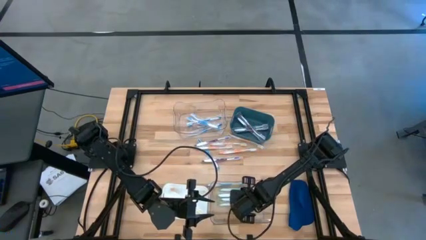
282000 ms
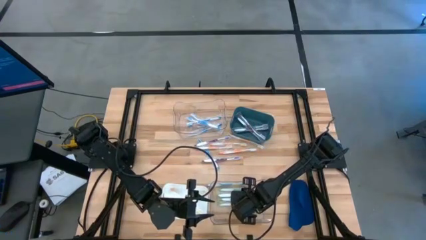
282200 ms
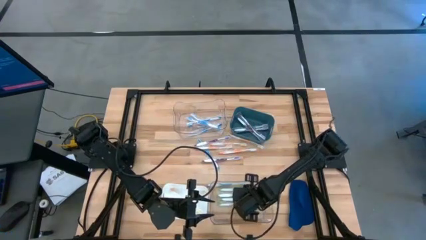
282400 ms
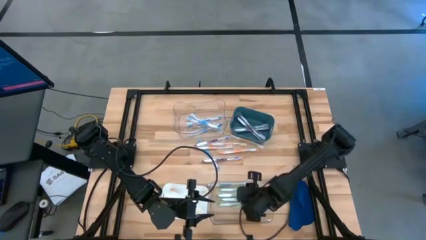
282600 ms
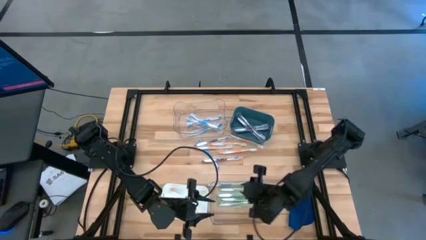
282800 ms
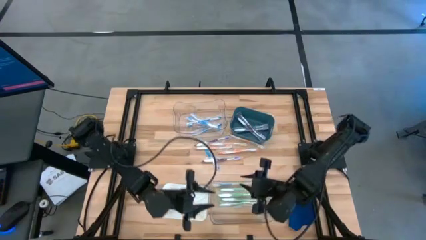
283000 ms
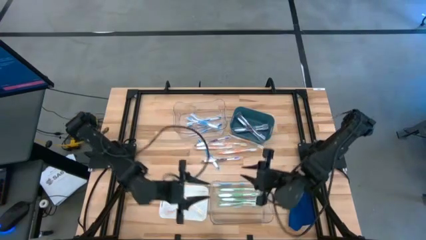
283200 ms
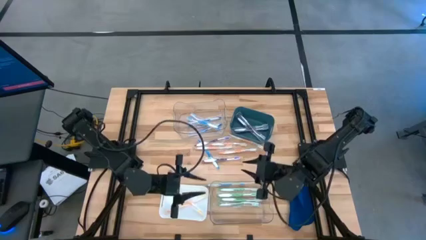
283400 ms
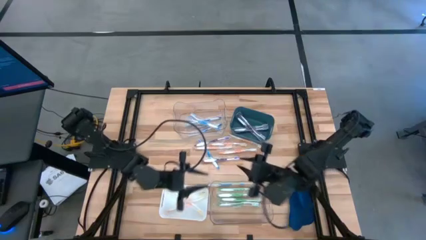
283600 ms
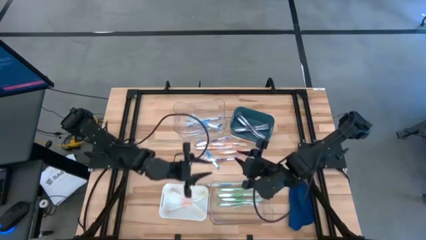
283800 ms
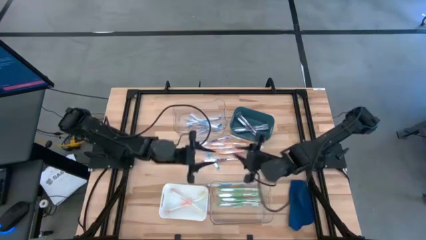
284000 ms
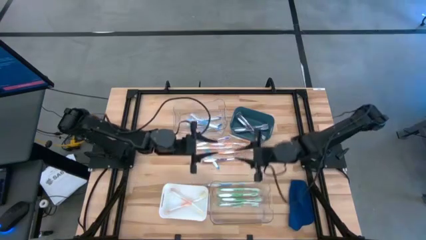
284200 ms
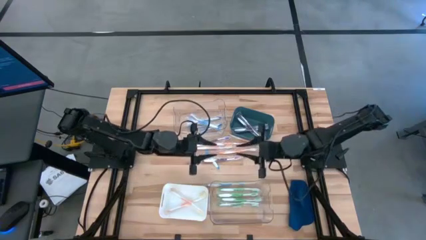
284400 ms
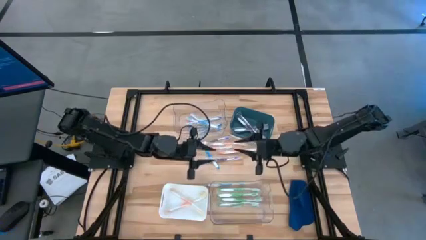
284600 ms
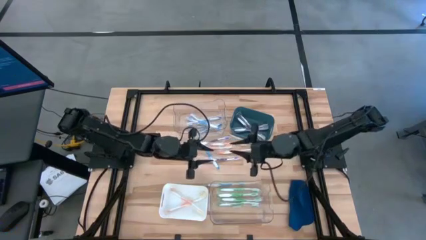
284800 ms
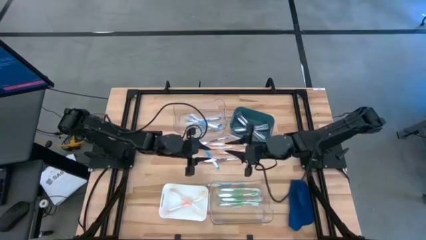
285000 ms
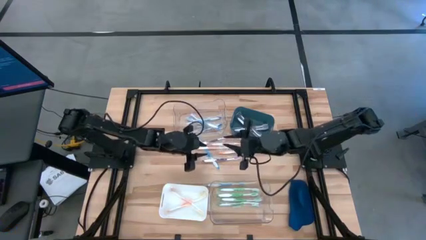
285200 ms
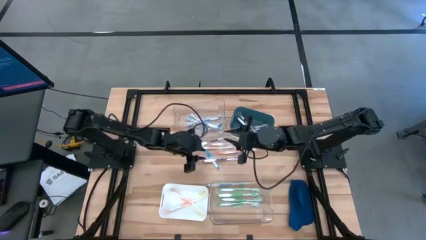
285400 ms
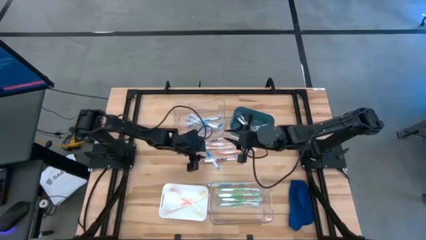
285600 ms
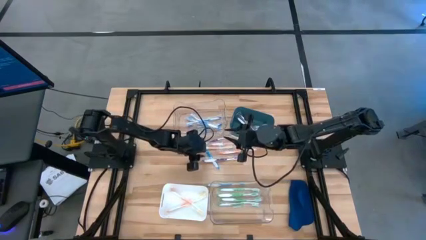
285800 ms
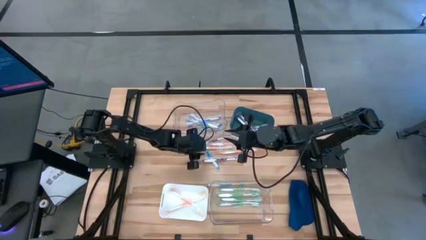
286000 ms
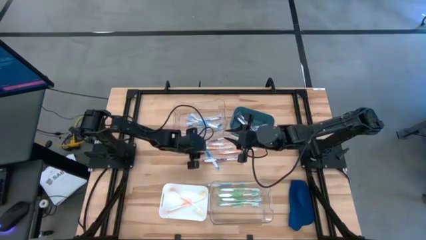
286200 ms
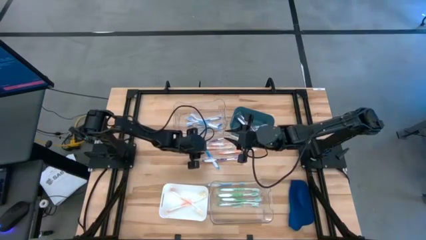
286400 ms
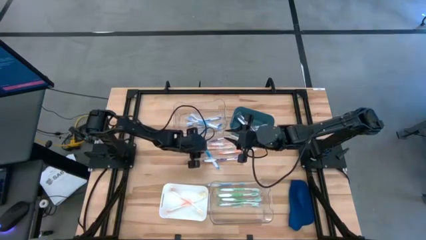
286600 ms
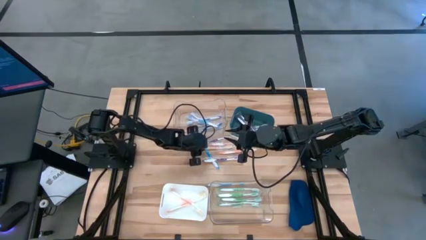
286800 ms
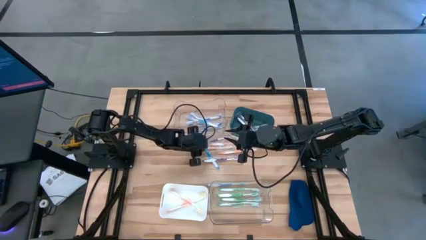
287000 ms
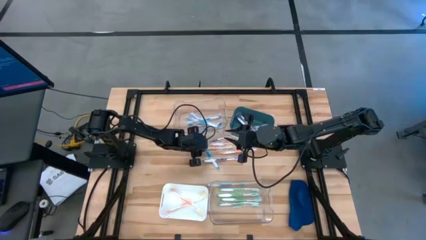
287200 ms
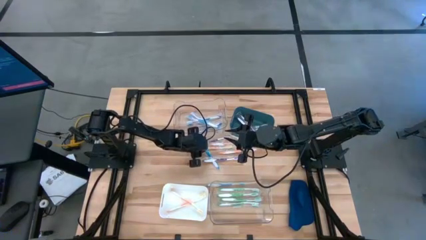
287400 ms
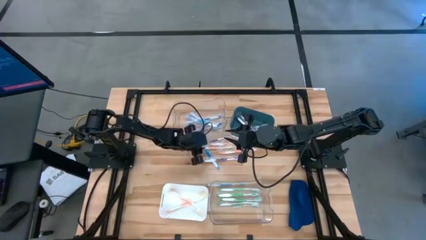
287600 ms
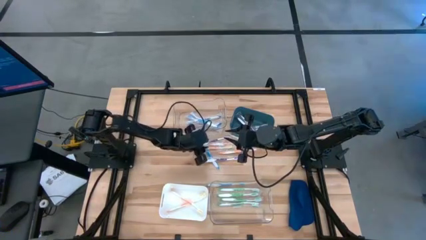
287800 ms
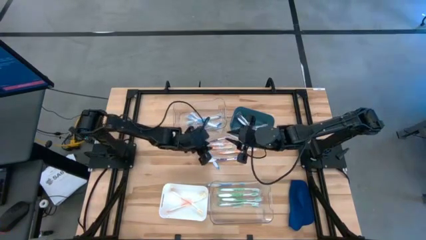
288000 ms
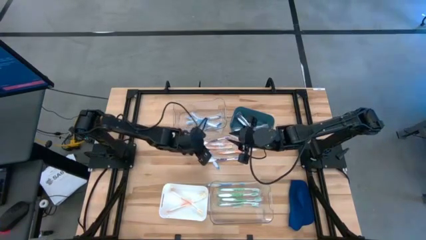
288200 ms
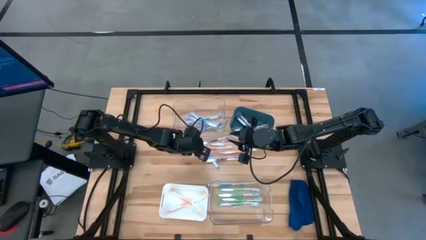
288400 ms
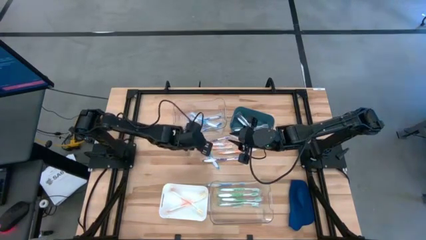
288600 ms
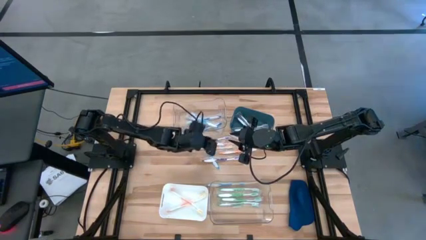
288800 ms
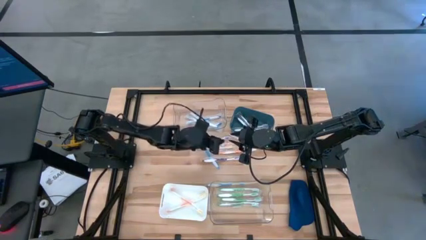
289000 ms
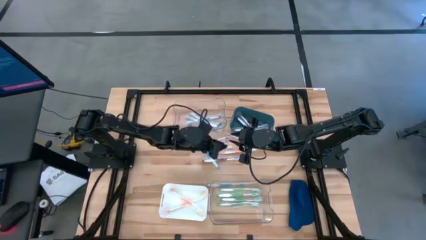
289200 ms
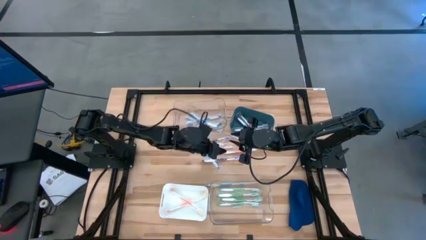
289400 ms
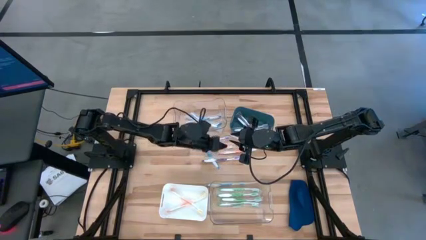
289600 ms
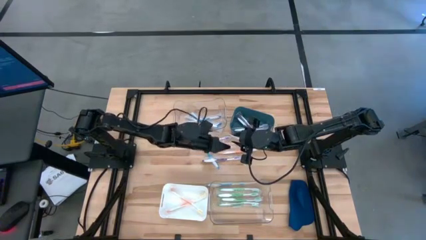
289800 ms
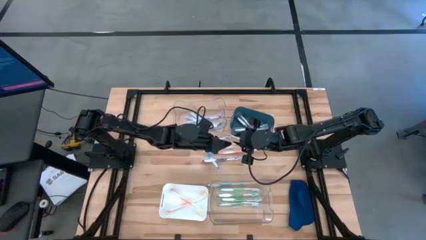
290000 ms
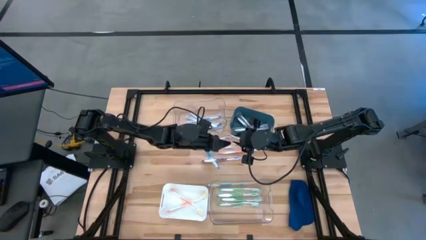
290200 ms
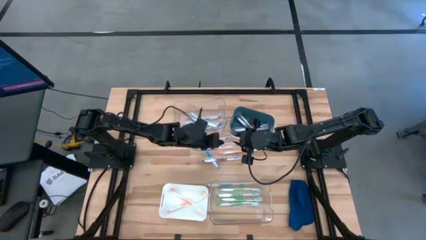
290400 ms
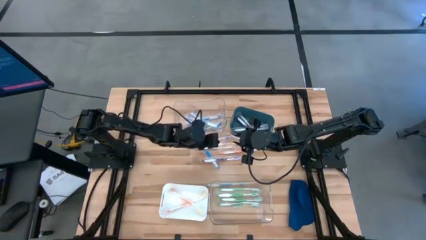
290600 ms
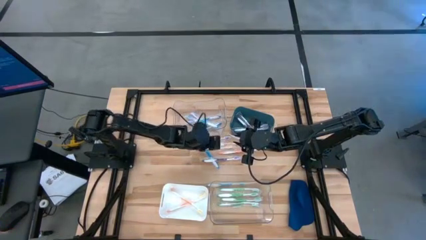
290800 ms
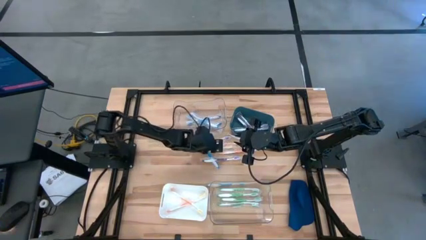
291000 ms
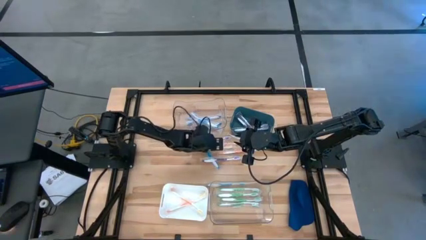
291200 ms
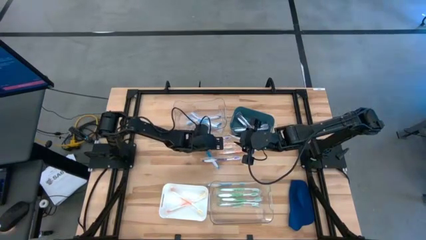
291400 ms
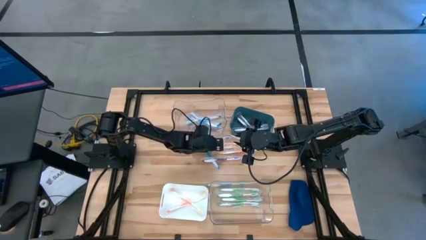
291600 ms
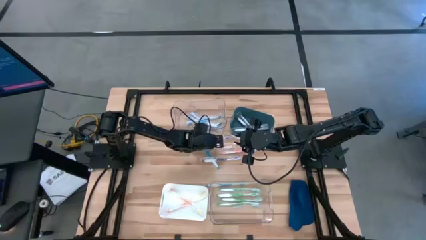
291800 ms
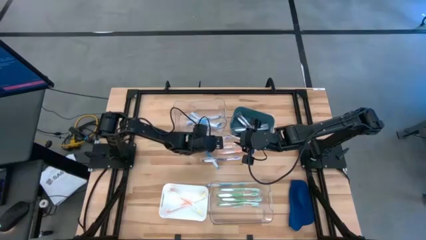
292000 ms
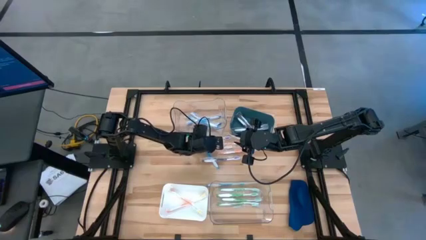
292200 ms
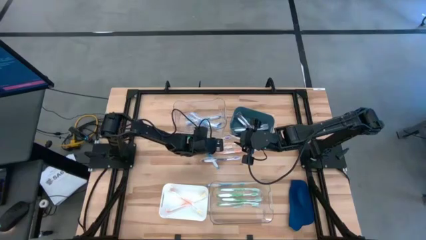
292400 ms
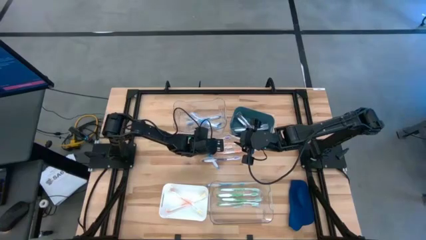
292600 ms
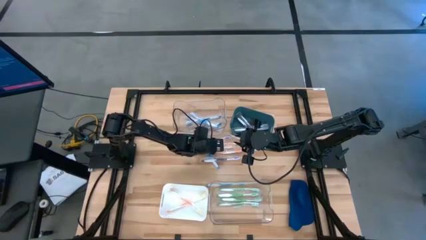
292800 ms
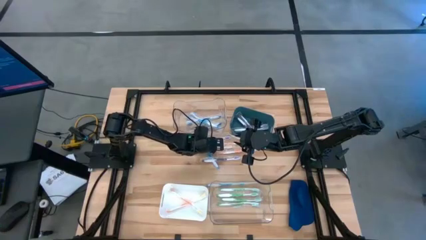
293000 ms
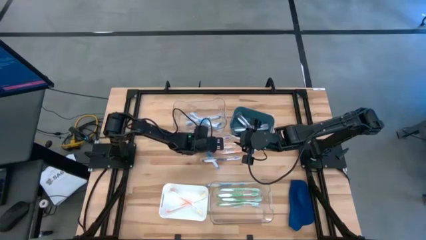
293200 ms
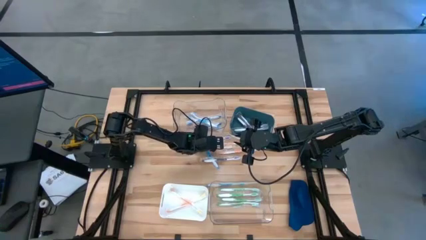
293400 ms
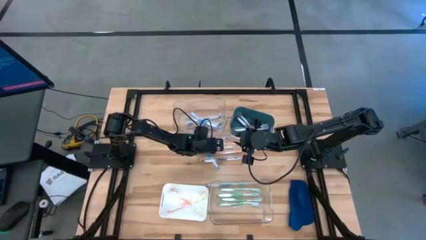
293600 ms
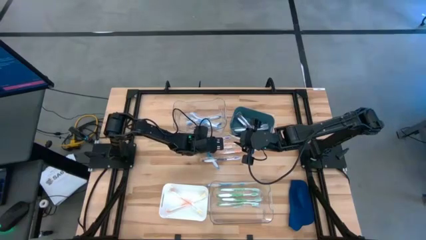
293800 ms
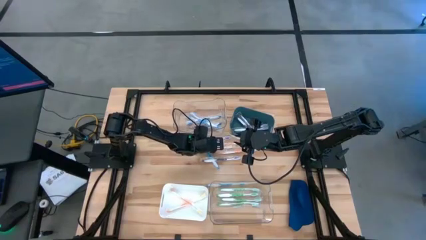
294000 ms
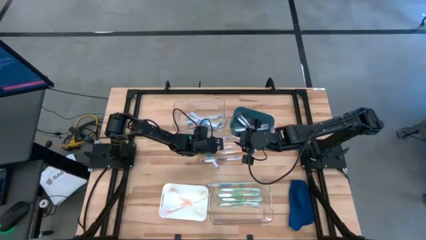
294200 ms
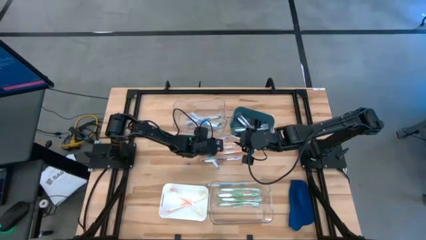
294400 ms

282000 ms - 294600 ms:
Task: Pick & Place Toothbrushes
Put the orange toothbrush into the white bin
